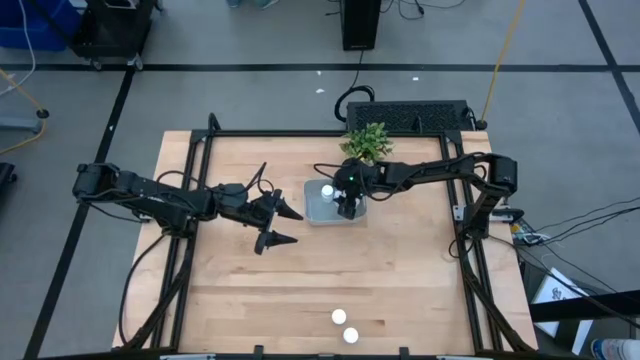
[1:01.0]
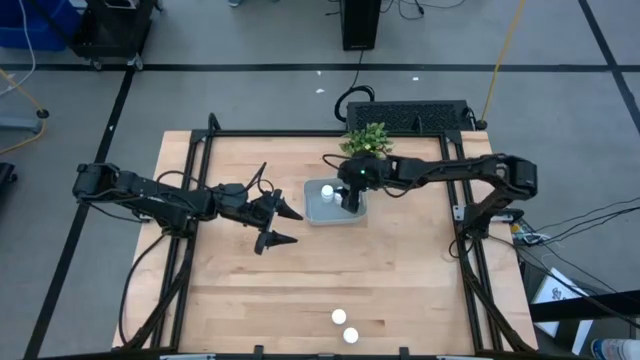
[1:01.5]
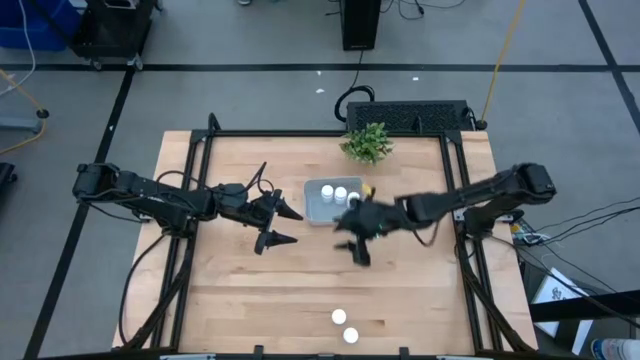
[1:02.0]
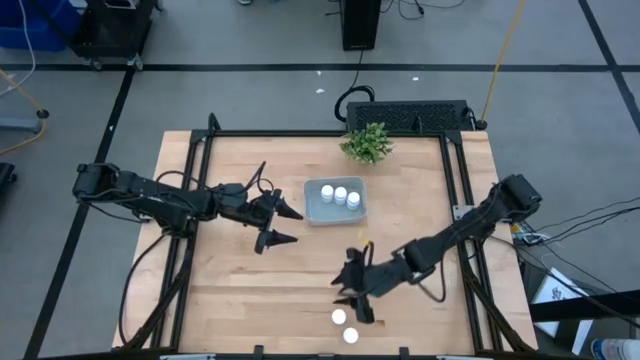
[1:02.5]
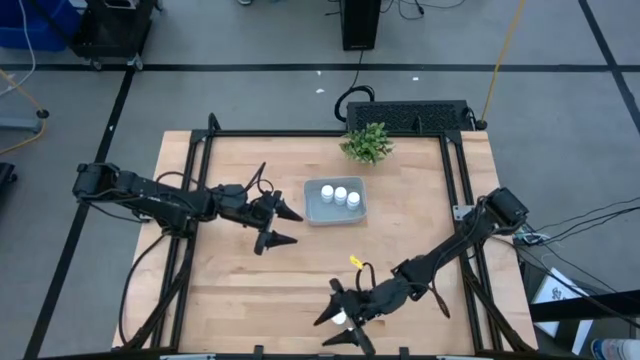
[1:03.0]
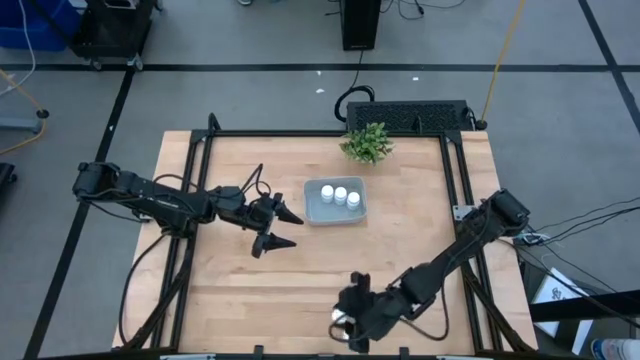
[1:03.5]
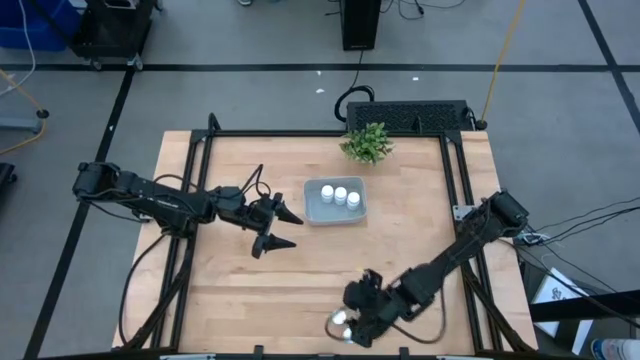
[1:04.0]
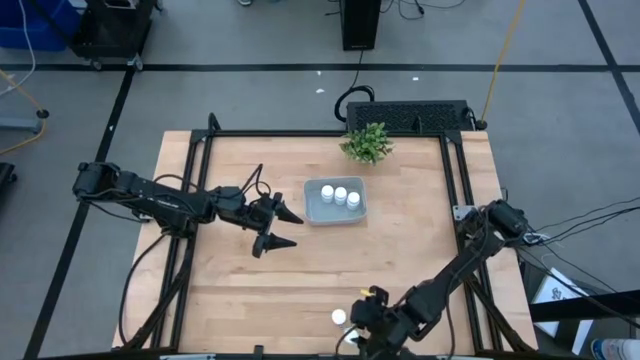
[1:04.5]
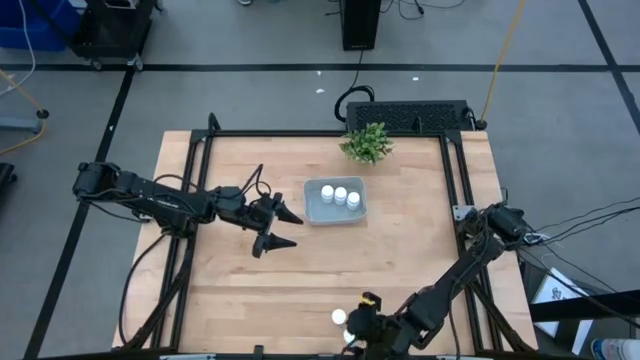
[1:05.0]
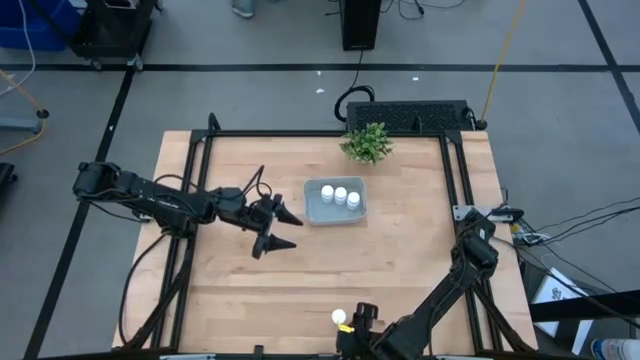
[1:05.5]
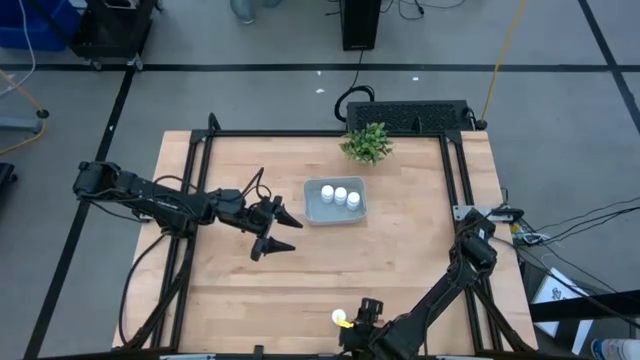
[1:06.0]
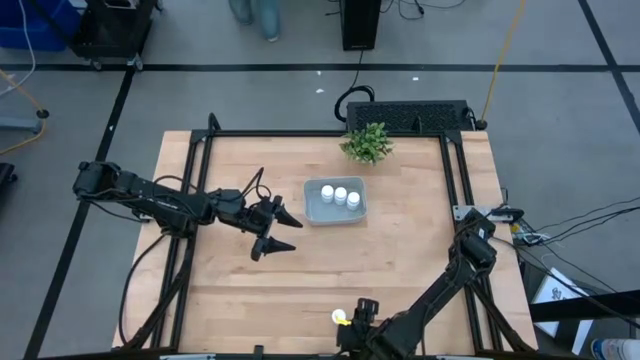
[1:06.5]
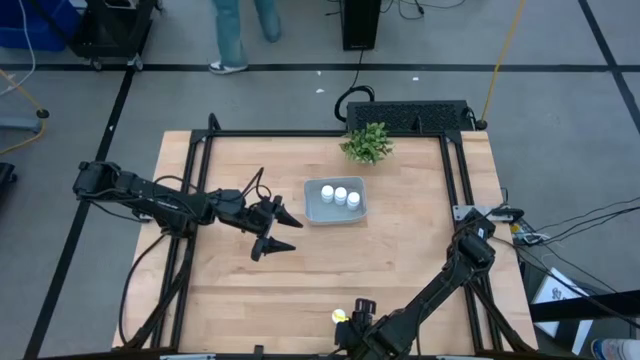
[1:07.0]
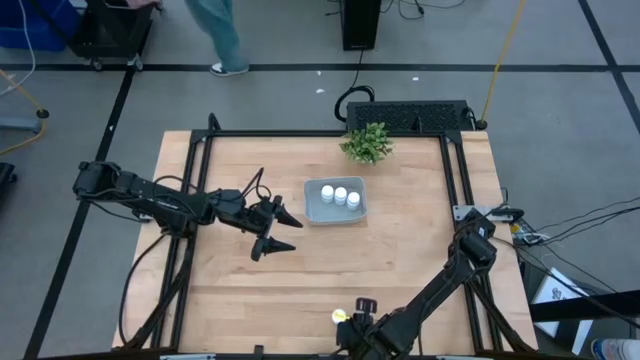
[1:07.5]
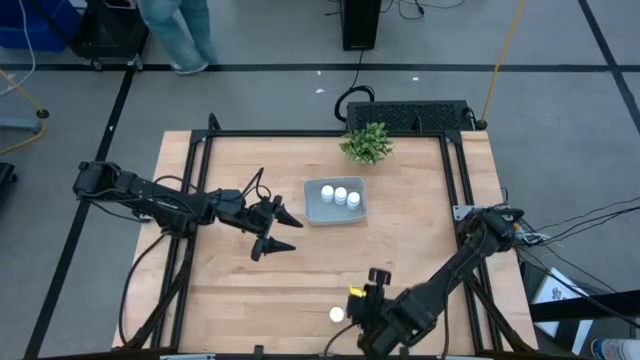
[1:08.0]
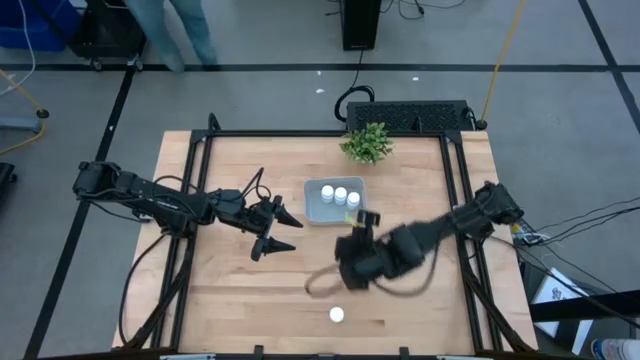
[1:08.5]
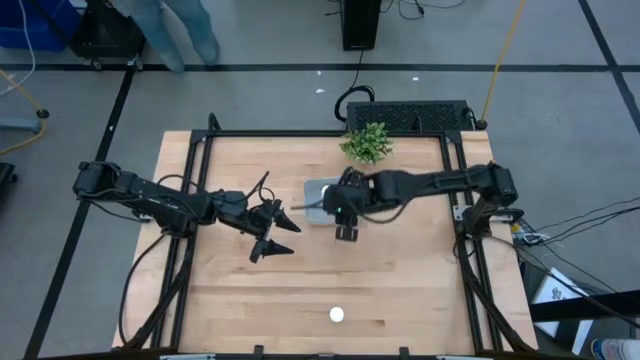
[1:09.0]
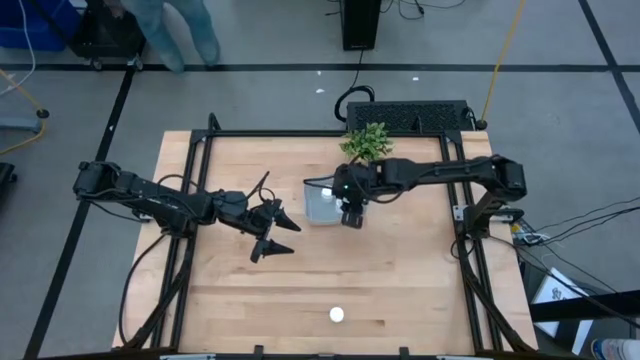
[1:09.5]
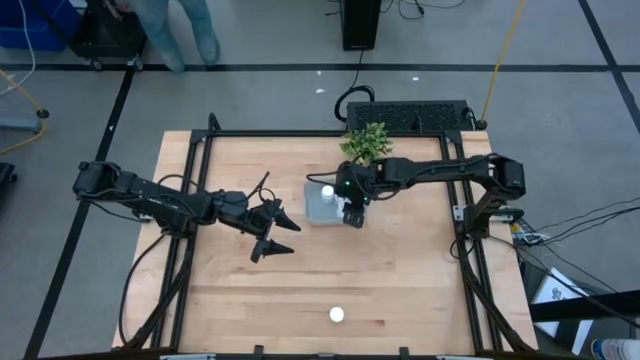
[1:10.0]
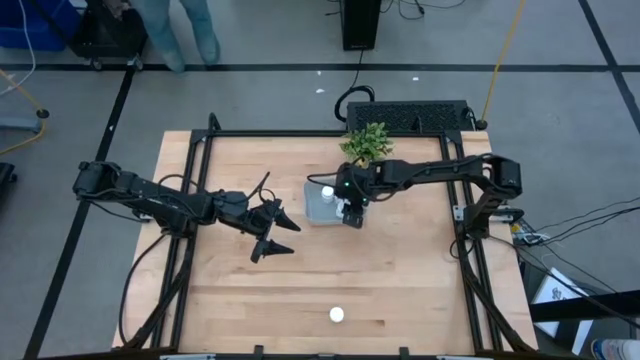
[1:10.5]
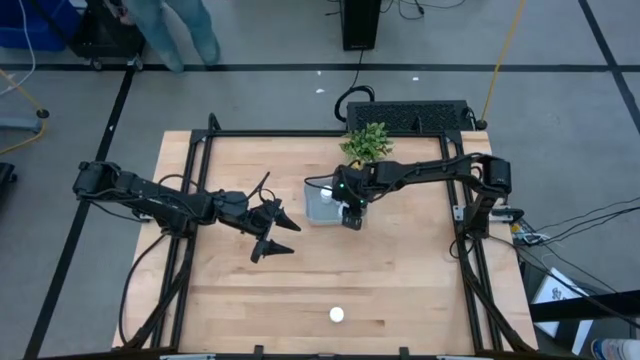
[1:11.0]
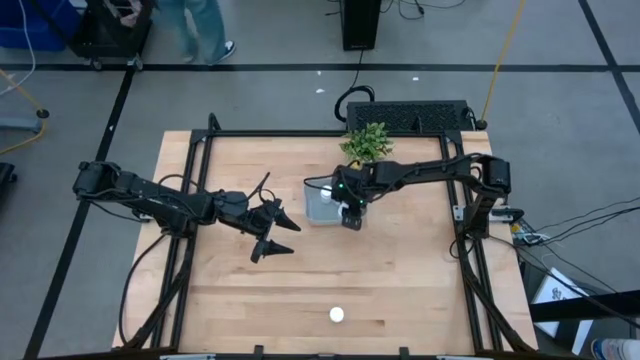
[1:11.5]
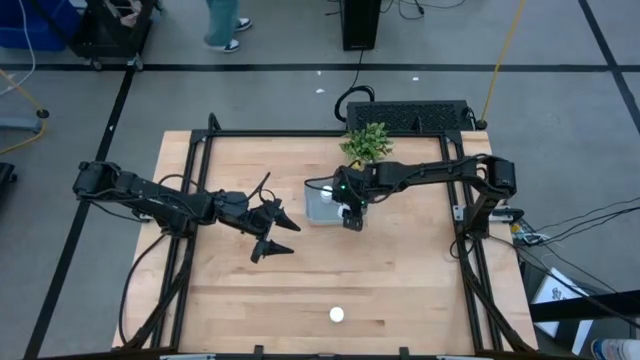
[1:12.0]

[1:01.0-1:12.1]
Task: Pick and place pill bottles into a basket
Put the white pill bottle into the gray bin

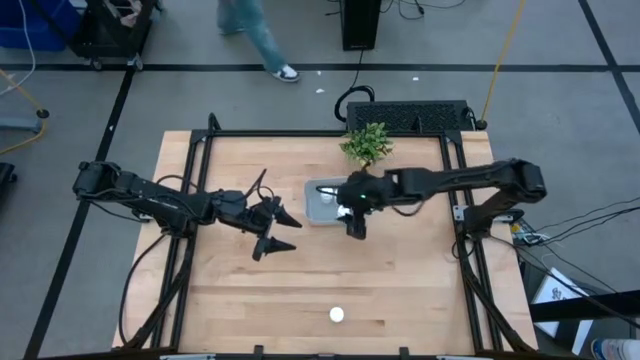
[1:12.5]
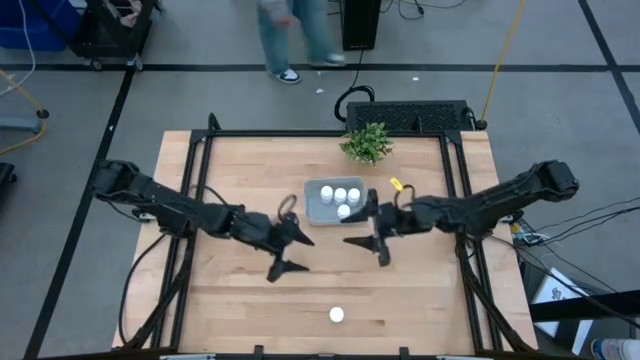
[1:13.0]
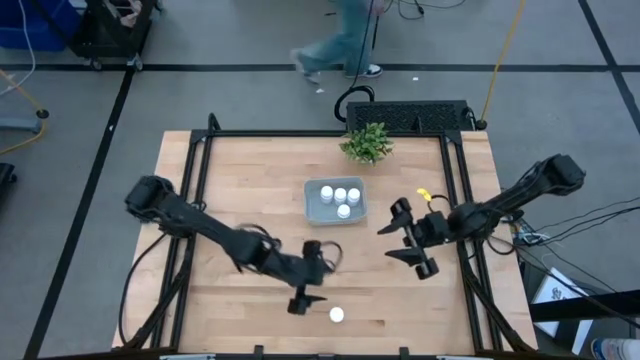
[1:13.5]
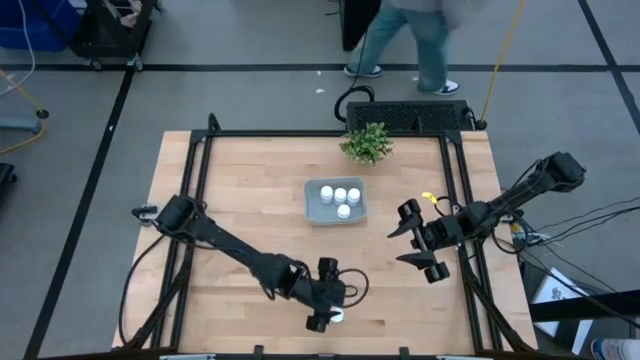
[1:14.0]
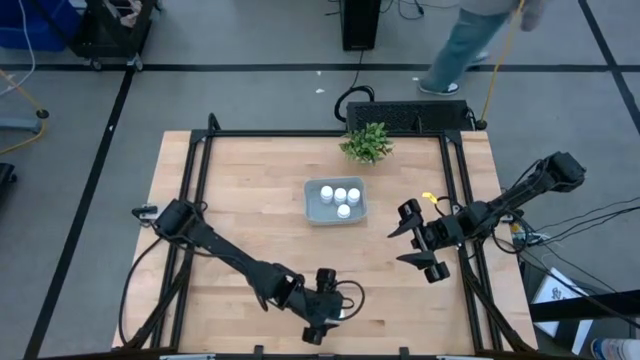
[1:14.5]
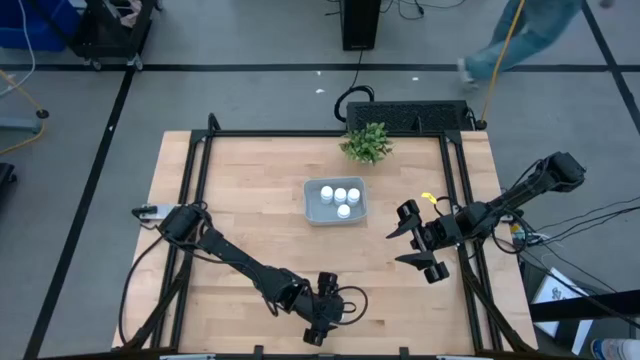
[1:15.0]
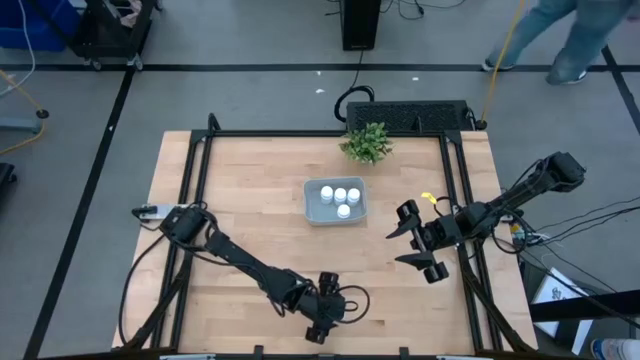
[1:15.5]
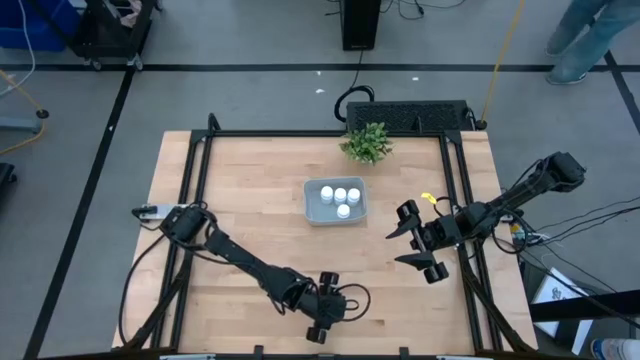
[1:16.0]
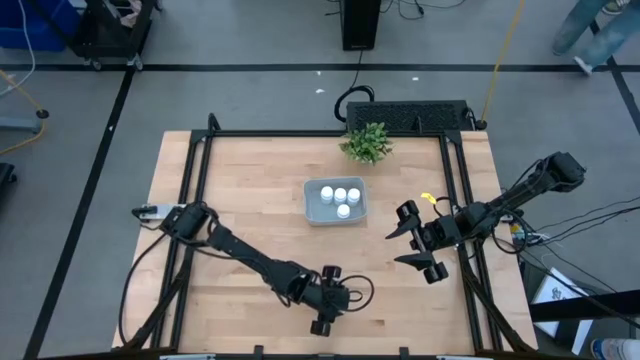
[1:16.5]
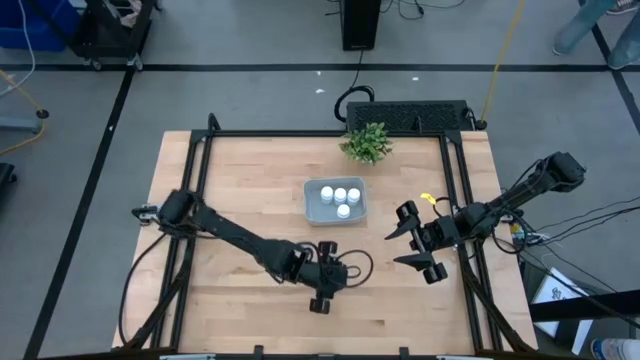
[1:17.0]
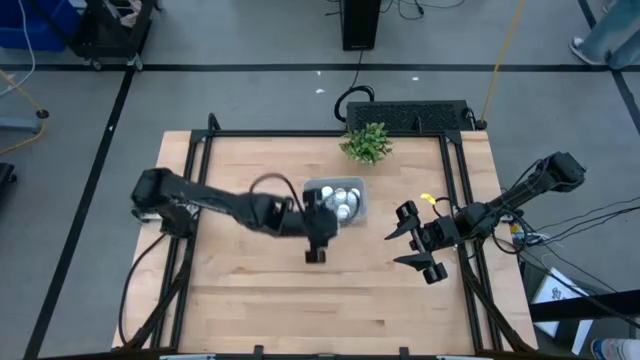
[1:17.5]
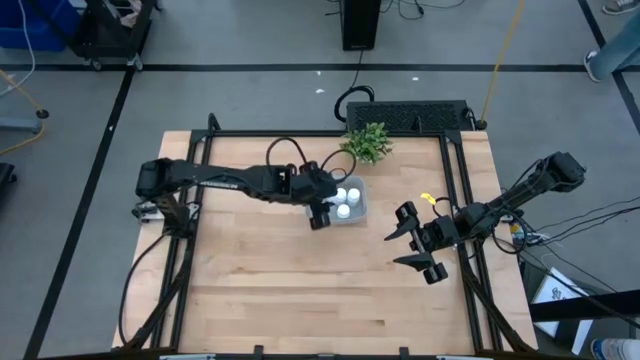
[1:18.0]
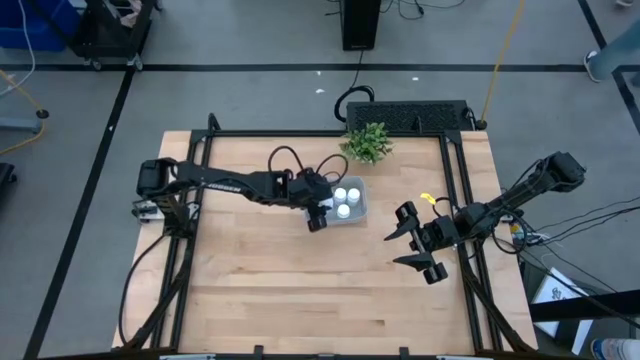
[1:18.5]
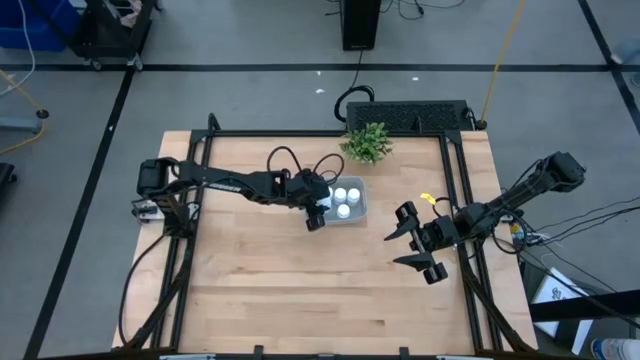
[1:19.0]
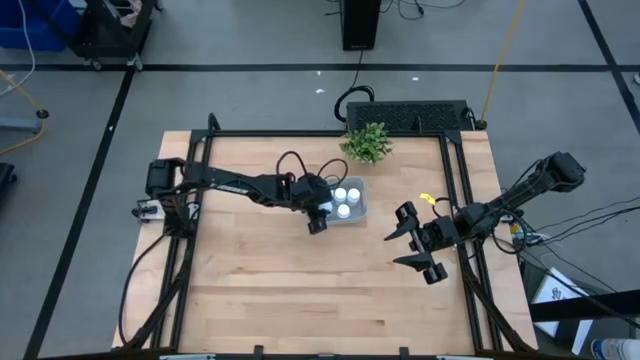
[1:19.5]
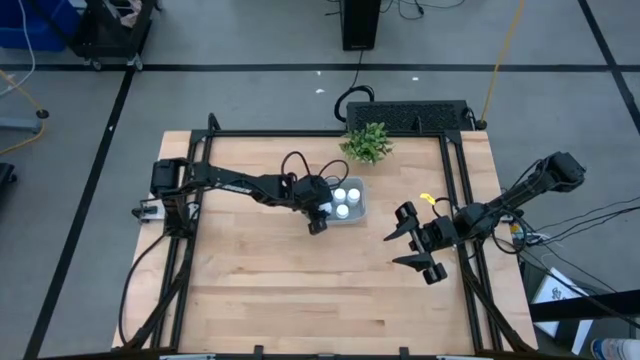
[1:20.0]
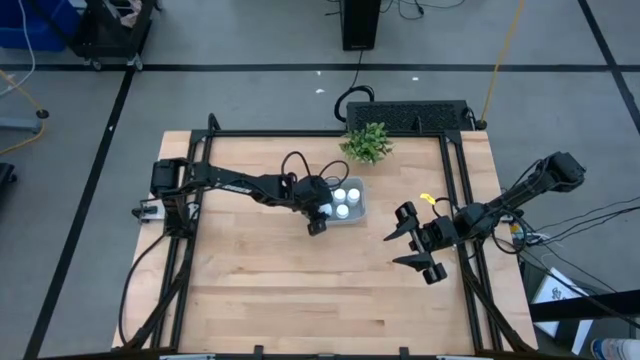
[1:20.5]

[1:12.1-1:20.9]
Put the white pill bottle into the gray bin

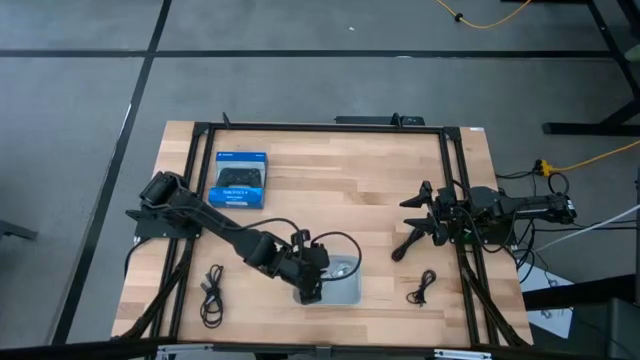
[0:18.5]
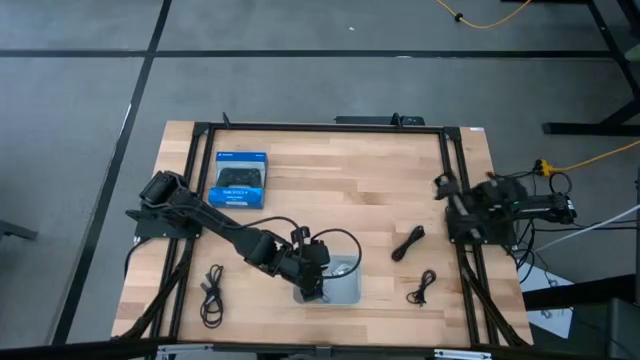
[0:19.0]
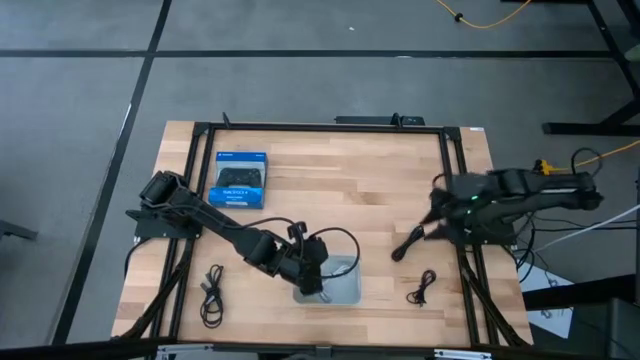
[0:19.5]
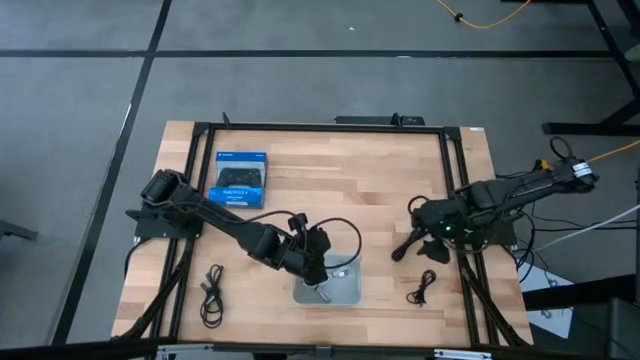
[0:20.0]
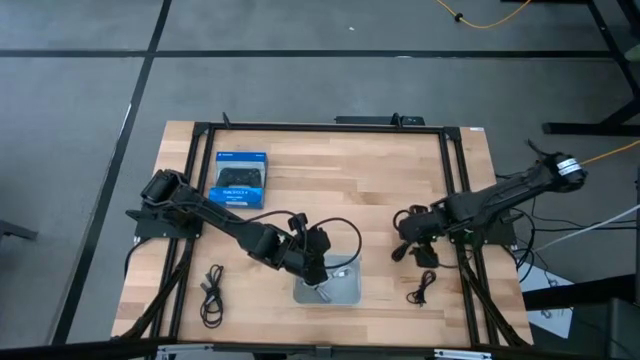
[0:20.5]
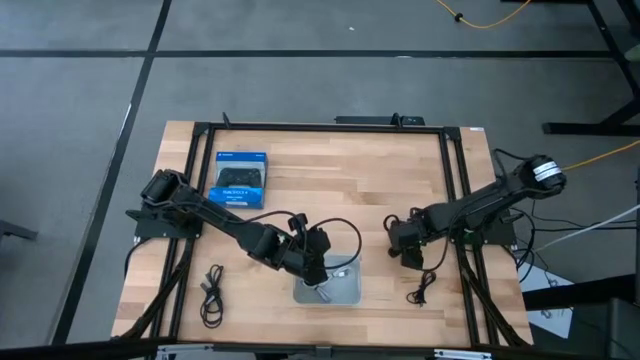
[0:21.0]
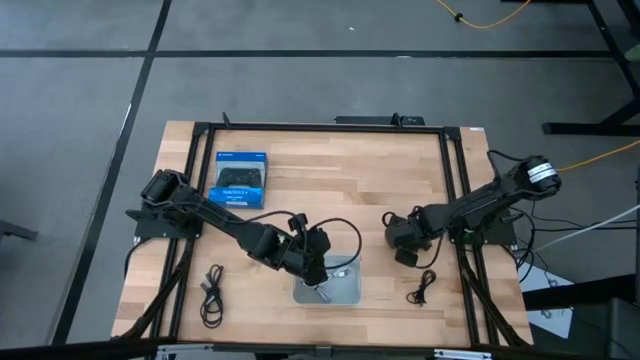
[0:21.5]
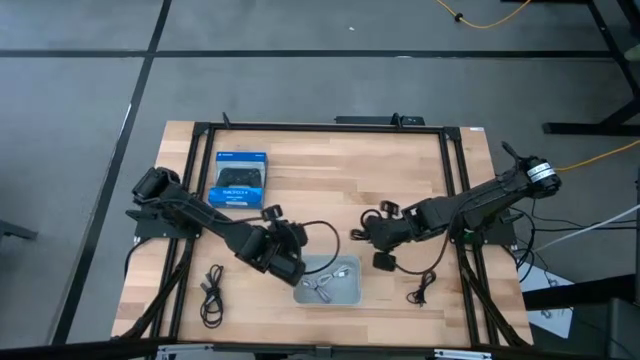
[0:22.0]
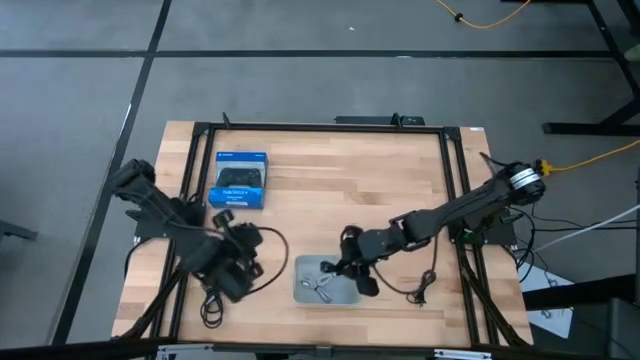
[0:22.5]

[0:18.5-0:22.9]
Task: Pick and place USB-C Cables
Put the top black charger cable into the gray bin
